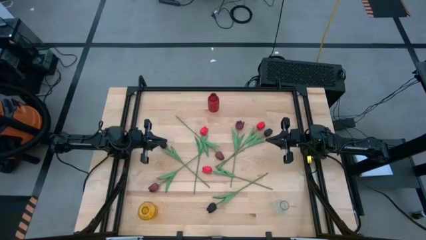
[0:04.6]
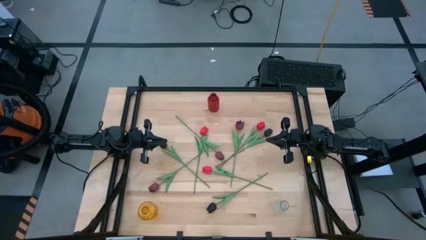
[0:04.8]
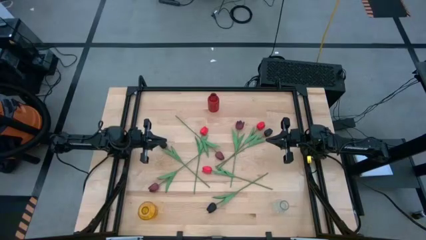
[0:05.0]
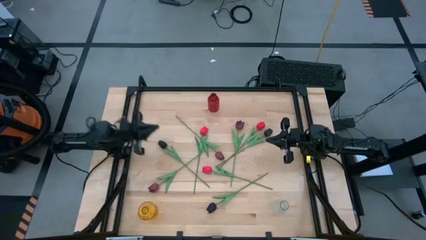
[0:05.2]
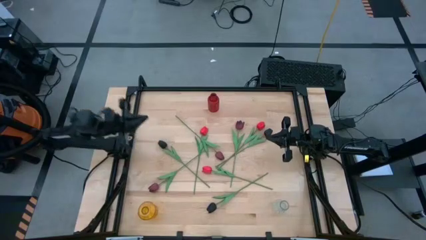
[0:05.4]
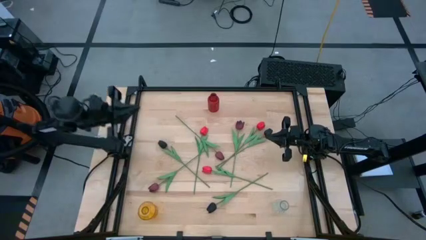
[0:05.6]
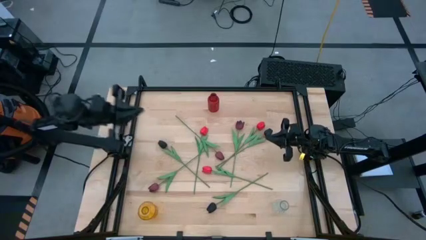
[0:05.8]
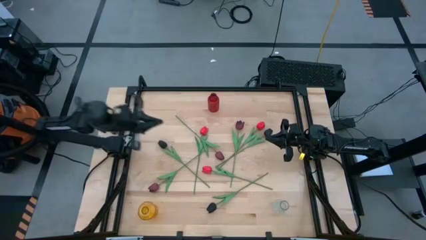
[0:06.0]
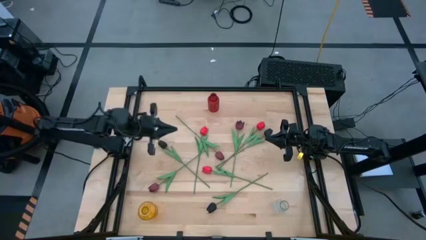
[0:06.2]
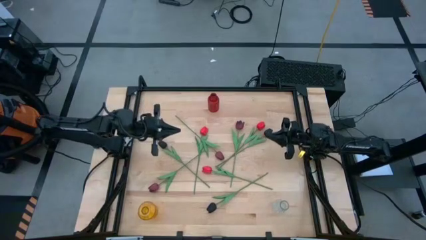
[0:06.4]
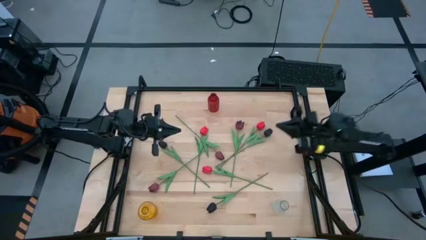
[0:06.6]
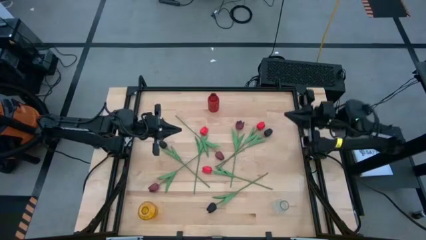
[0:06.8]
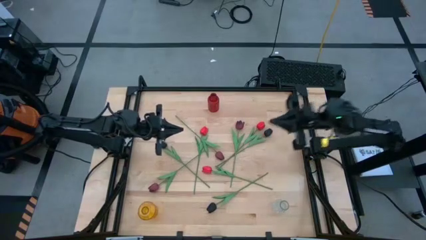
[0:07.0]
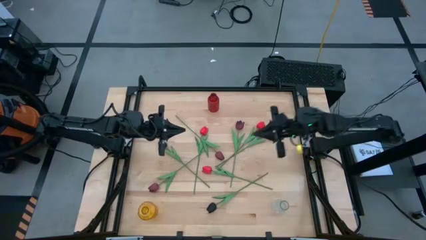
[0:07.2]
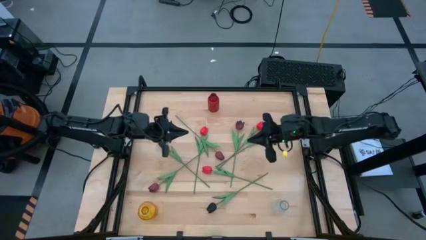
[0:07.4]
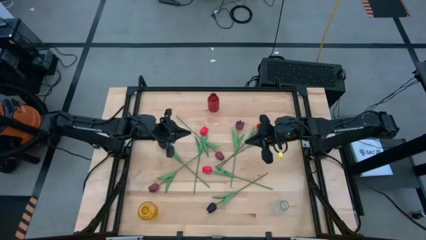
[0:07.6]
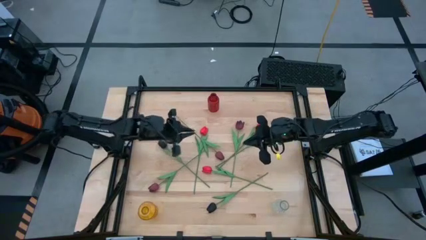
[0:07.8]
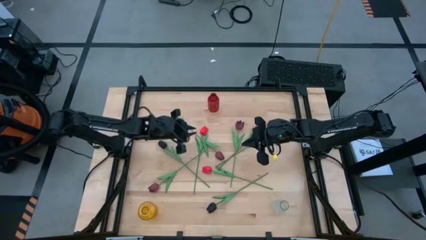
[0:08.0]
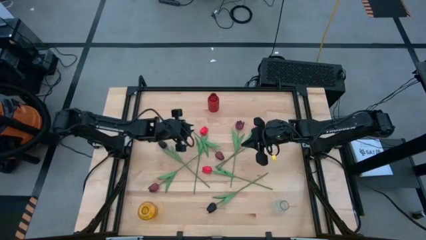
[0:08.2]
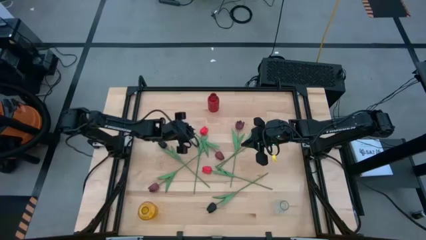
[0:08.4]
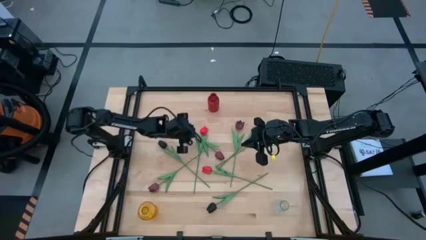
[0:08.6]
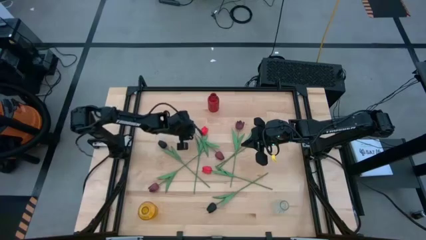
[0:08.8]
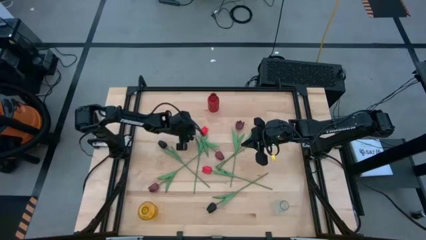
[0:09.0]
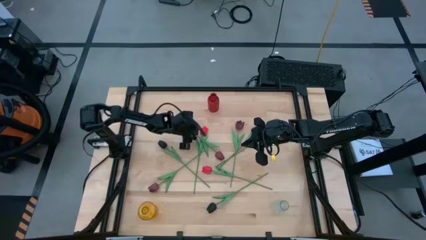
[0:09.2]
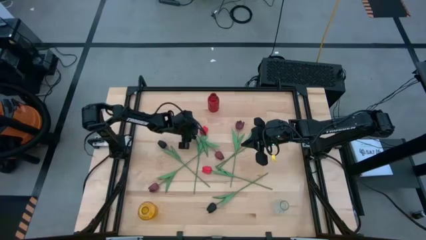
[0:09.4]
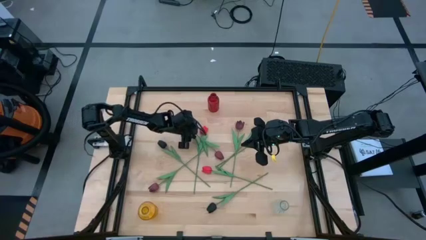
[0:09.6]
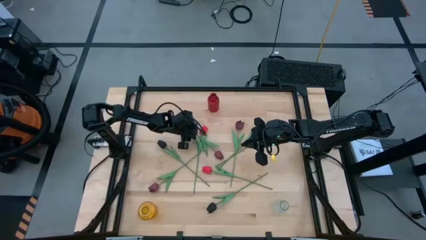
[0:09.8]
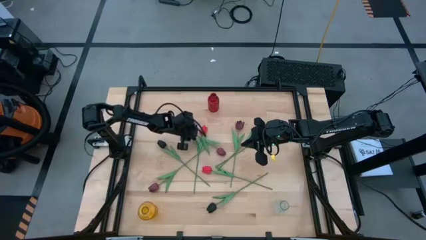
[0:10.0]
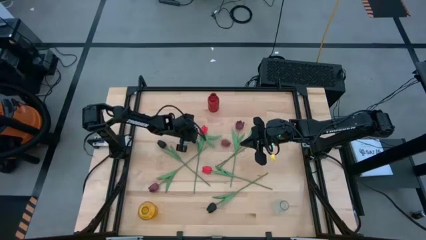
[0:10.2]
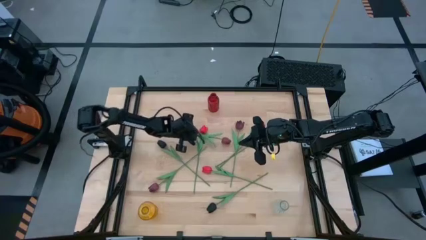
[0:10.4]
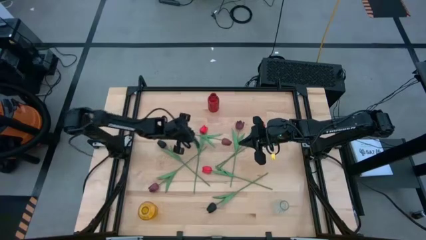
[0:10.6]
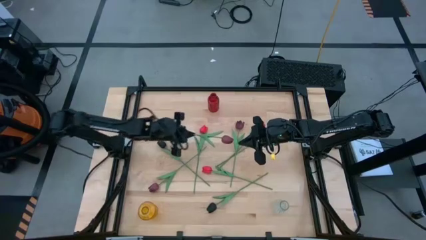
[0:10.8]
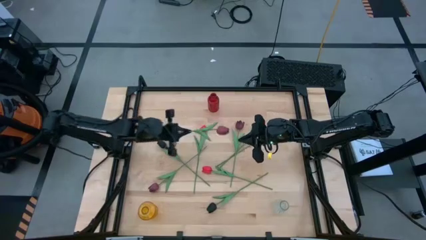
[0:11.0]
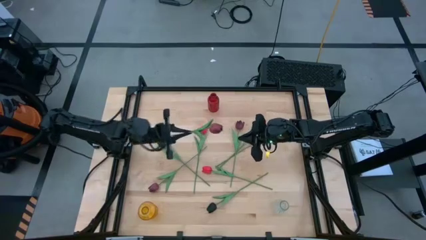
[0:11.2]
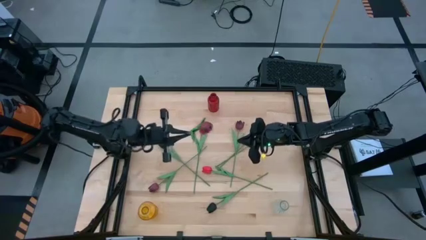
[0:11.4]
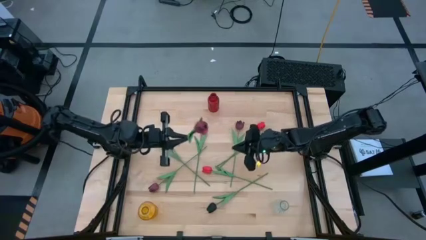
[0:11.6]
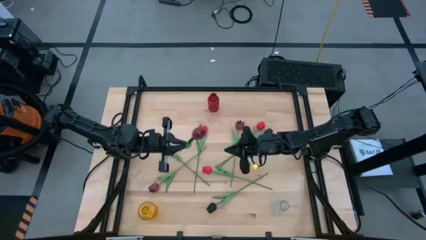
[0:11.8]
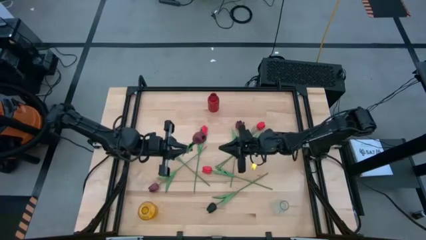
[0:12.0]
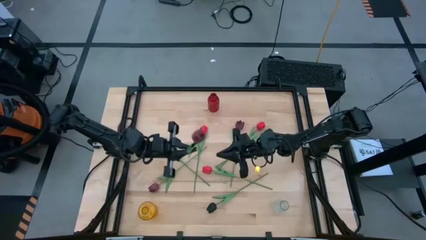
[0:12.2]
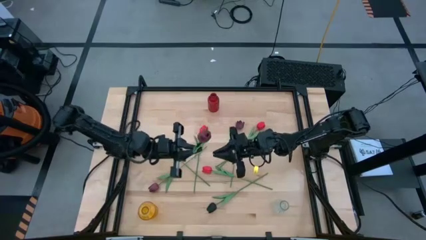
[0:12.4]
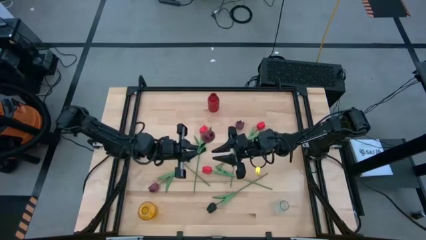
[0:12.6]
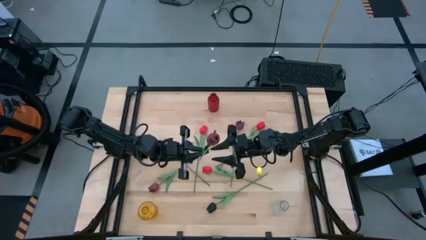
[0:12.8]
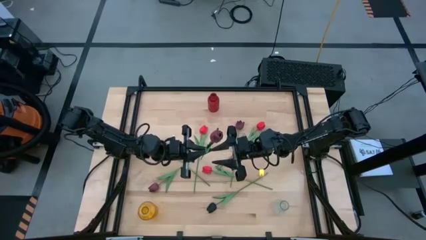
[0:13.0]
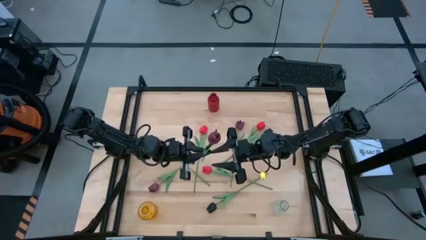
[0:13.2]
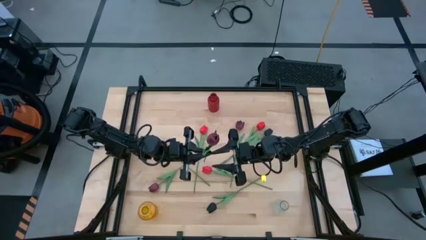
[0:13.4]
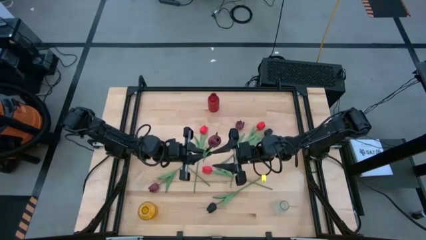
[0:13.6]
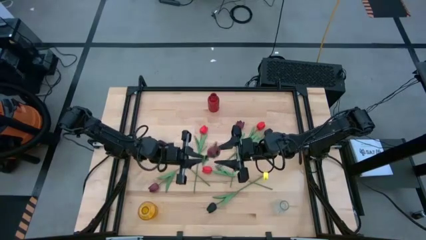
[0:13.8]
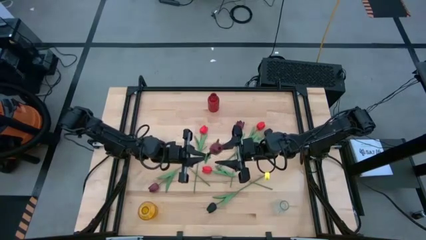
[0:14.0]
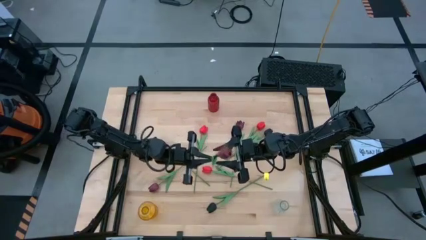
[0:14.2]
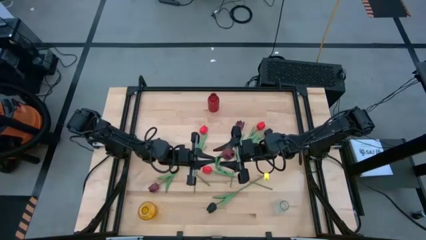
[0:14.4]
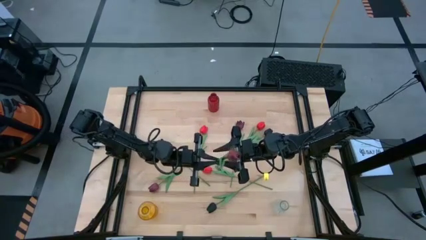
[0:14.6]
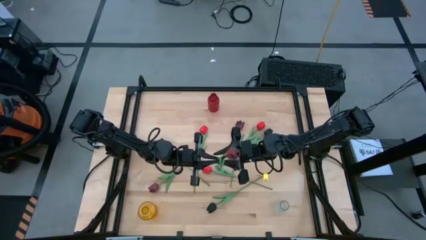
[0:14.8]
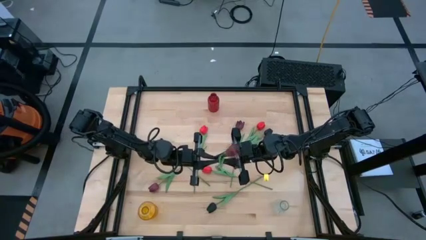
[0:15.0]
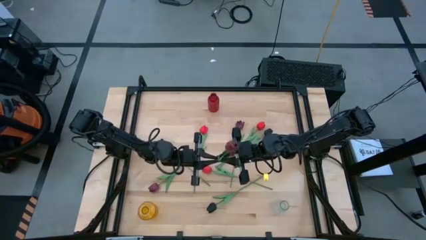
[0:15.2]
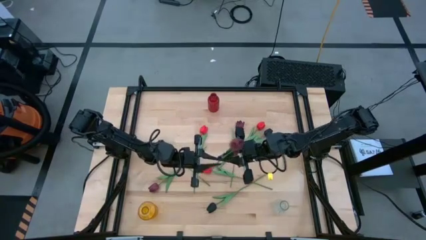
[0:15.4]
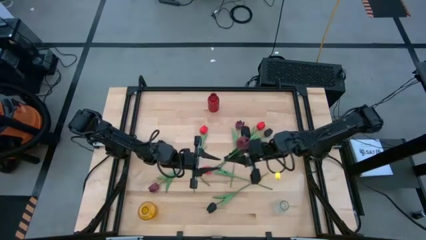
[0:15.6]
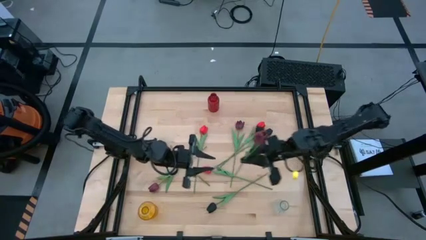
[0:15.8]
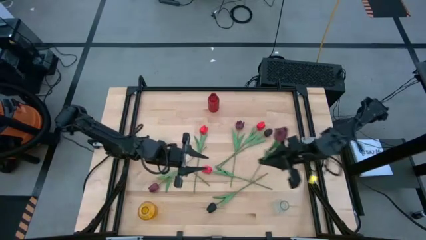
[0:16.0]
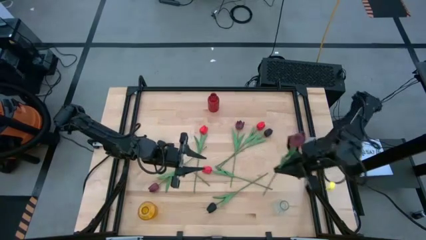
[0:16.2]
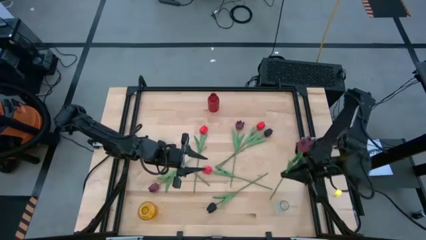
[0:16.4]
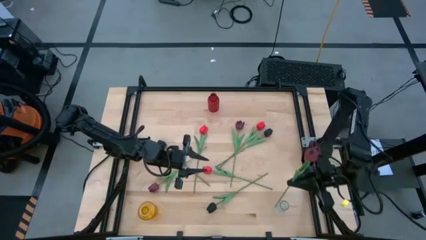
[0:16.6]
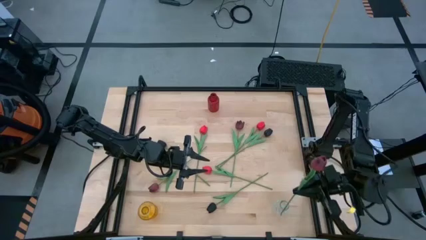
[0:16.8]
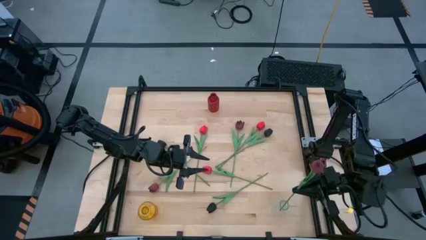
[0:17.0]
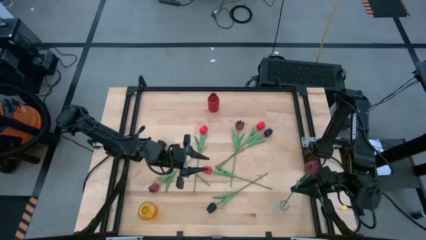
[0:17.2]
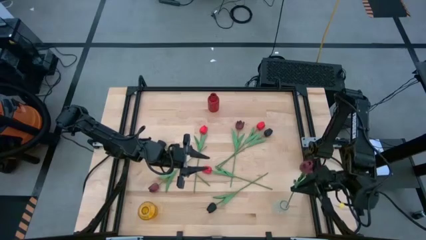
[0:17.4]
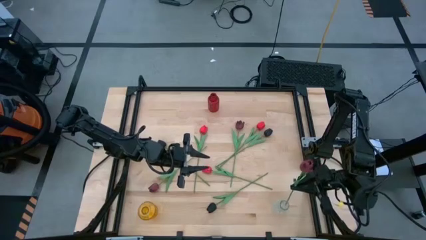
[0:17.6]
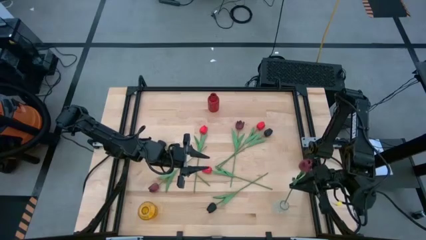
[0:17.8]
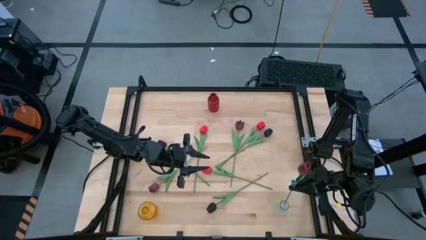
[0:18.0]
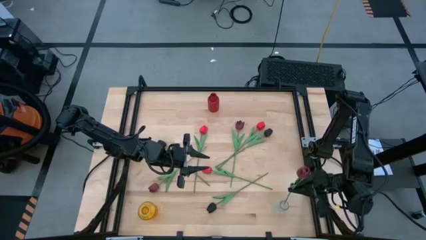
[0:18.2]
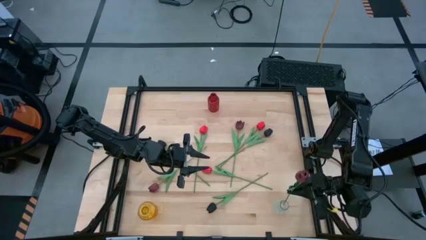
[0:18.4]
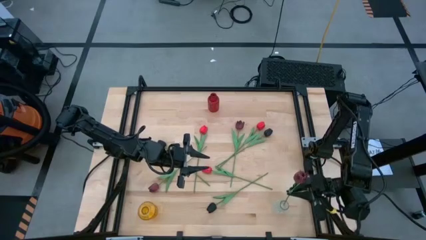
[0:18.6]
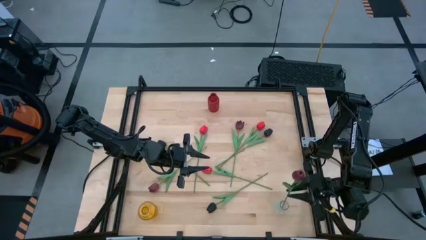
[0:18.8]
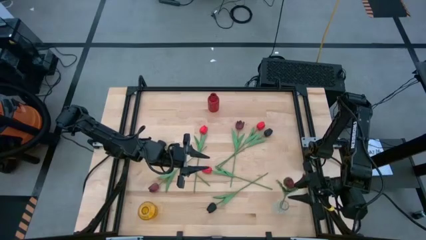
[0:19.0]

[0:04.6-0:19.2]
Task: Sort flowers into vase by color
Put the middle dark red flower into the transparent vase

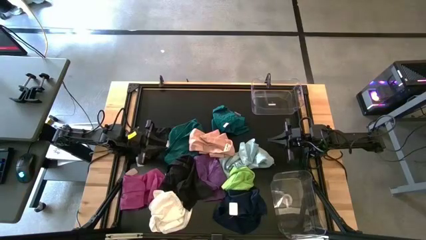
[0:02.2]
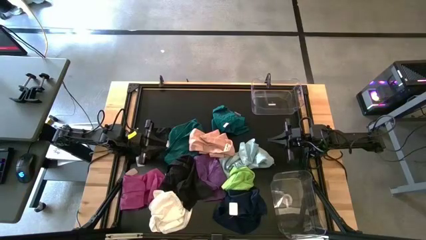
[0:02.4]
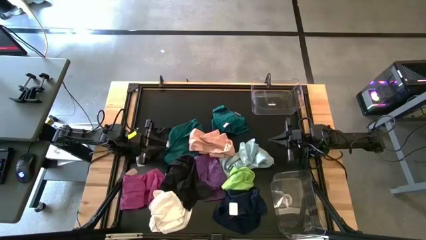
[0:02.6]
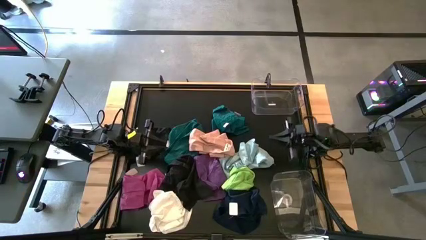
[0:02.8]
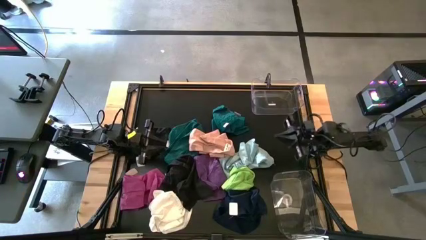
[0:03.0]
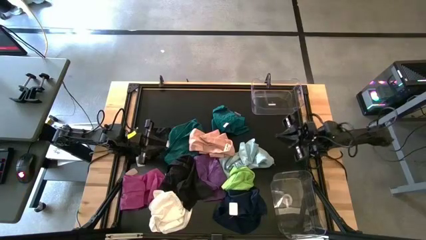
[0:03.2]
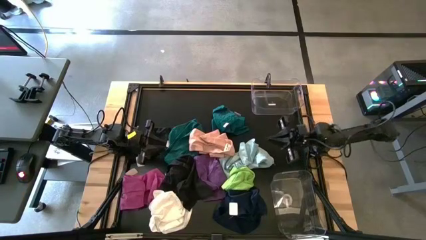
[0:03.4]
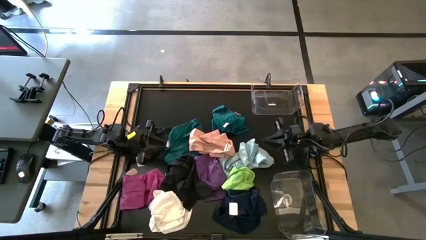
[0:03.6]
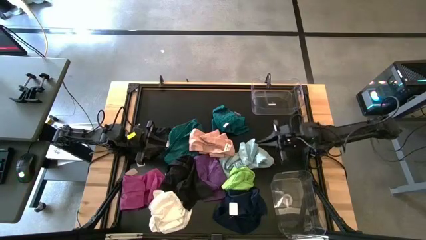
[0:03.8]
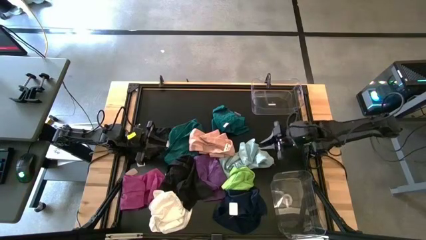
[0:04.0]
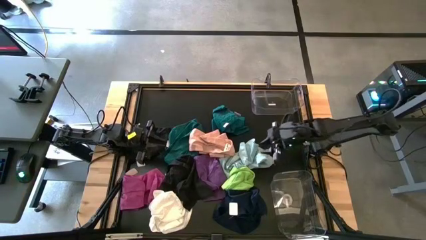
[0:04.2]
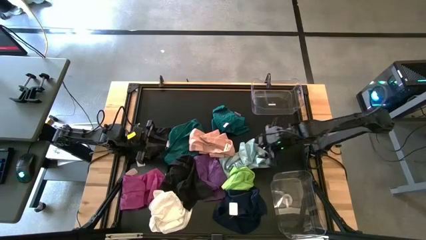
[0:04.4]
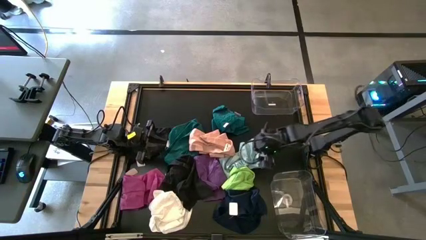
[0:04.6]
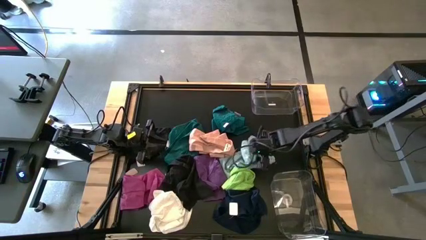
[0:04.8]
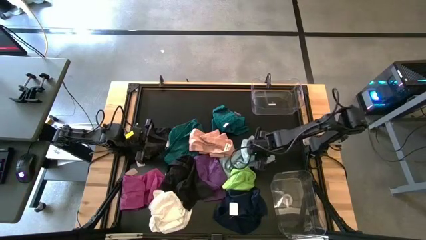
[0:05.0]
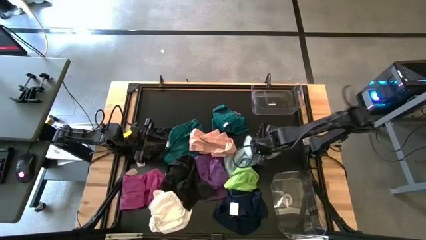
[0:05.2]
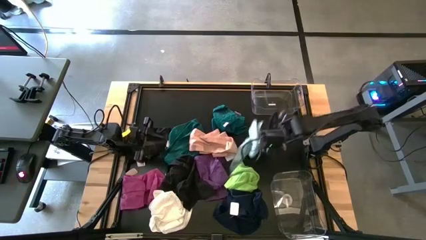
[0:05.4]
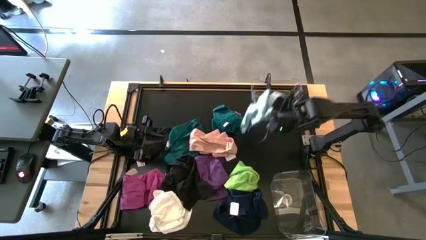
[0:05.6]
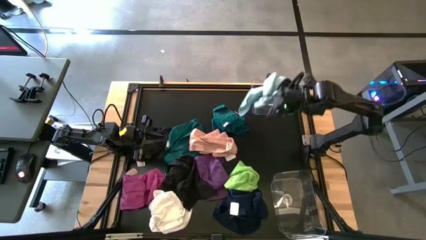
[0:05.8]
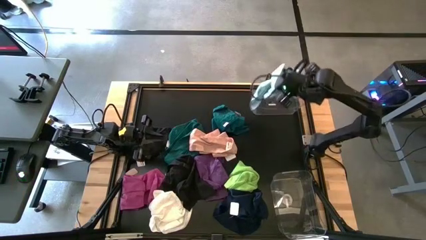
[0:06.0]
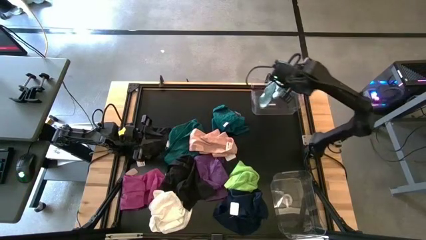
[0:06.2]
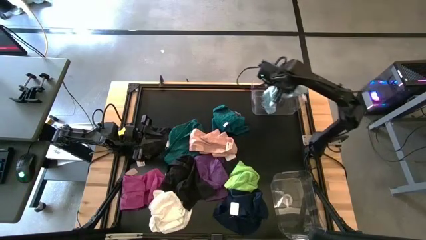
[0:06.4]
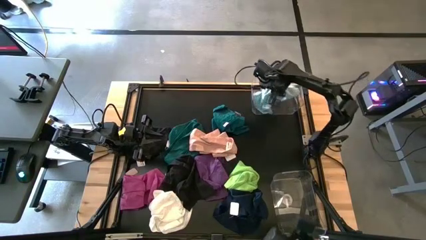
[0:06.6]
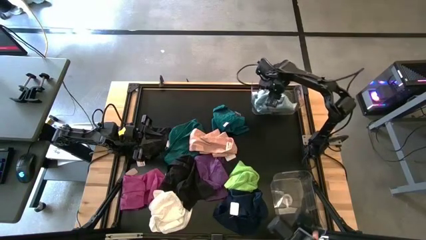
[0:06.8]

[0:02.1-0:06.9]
Task: Sort towels by color in basket
Put the blue towel into the top transparent bin
